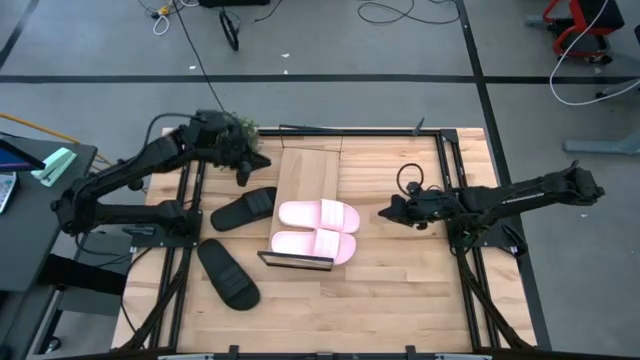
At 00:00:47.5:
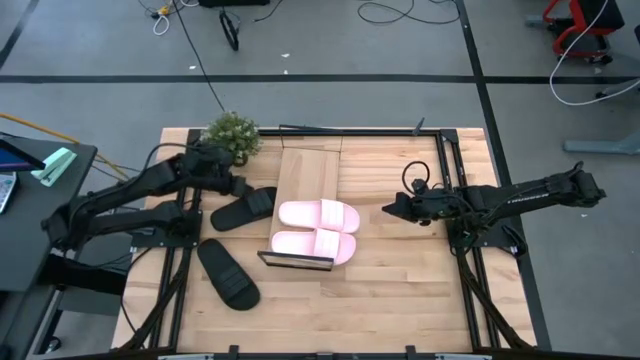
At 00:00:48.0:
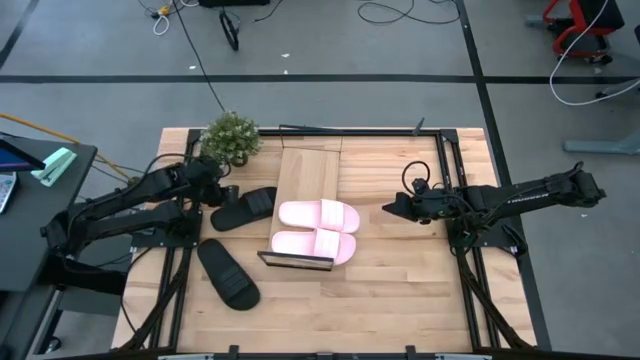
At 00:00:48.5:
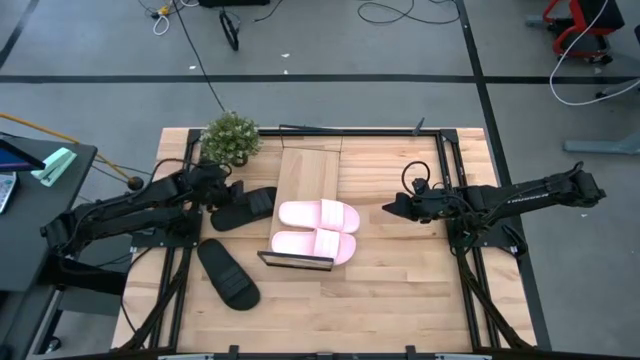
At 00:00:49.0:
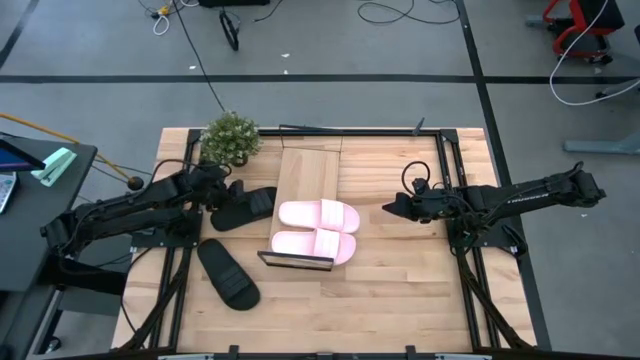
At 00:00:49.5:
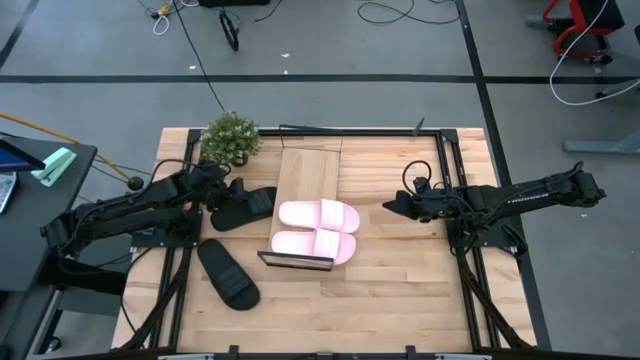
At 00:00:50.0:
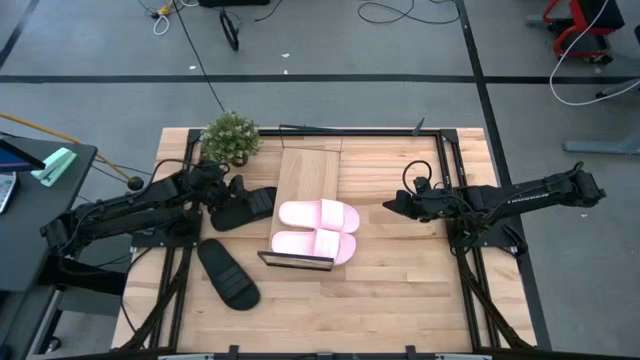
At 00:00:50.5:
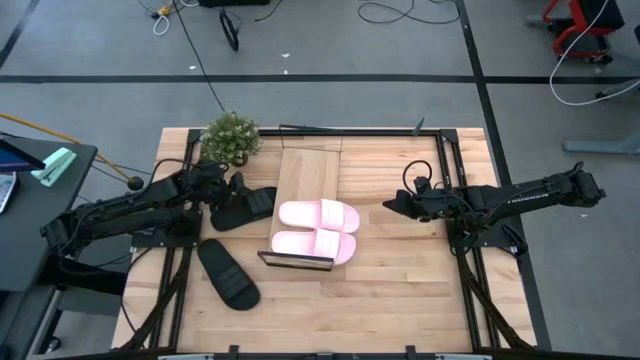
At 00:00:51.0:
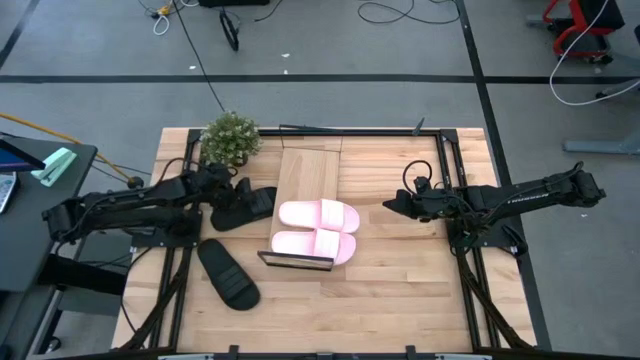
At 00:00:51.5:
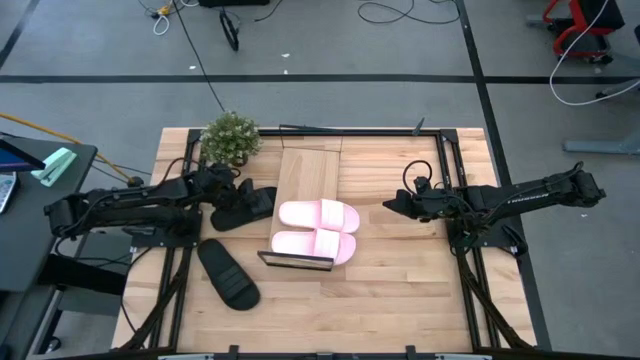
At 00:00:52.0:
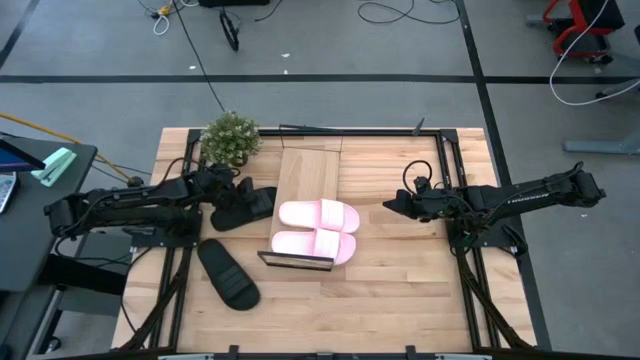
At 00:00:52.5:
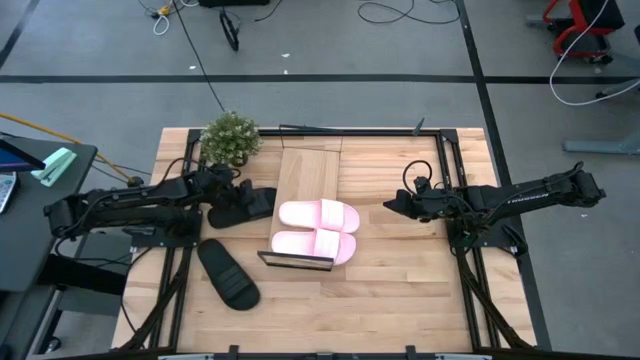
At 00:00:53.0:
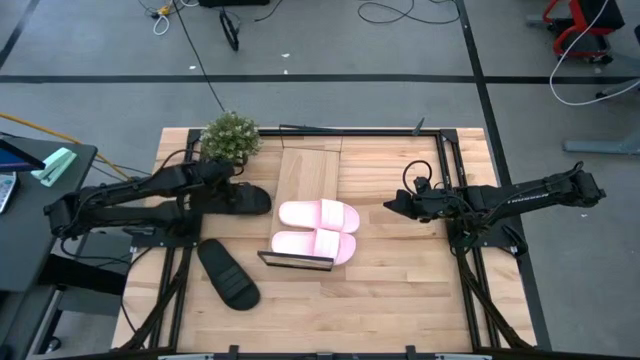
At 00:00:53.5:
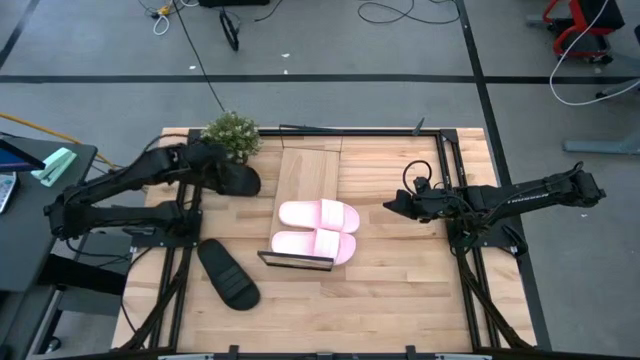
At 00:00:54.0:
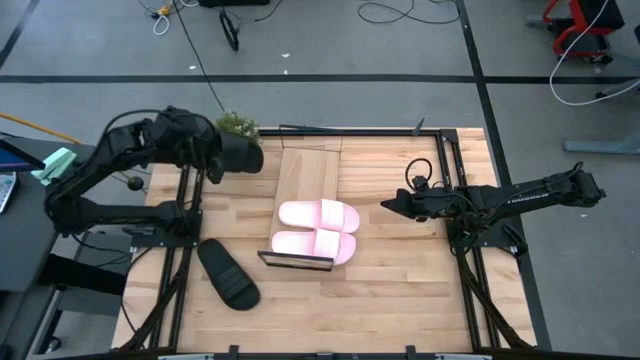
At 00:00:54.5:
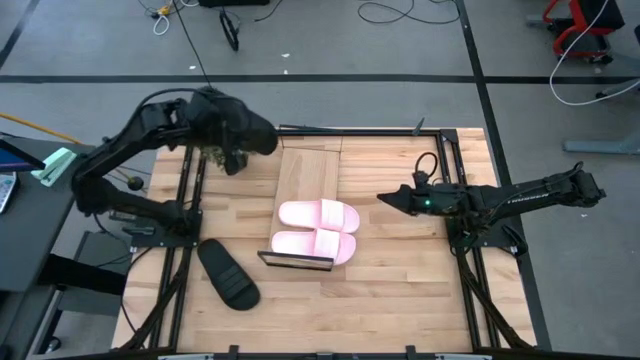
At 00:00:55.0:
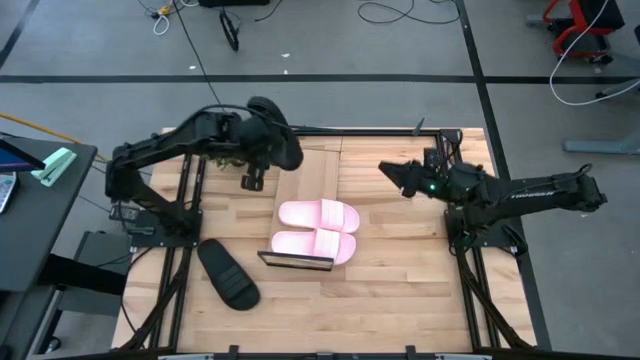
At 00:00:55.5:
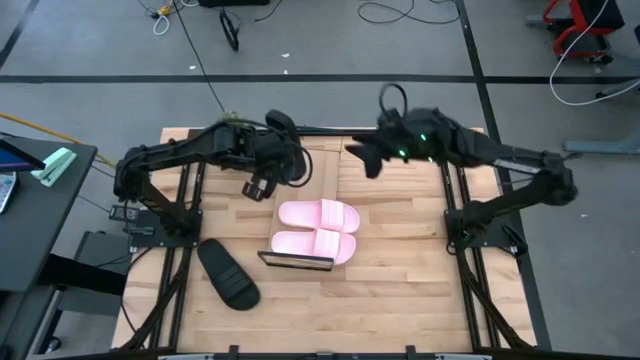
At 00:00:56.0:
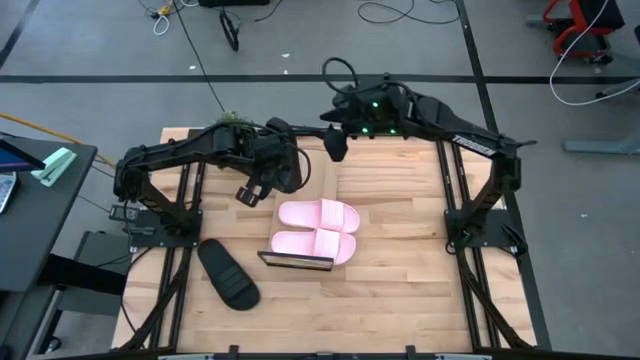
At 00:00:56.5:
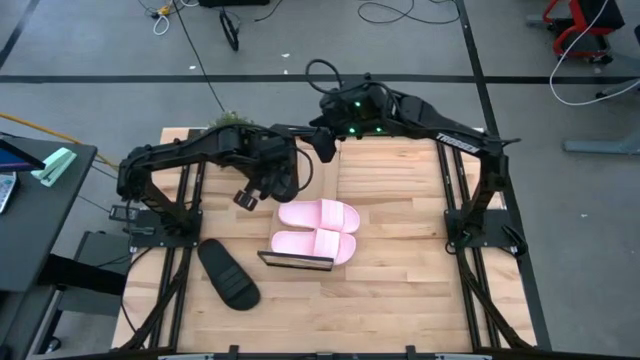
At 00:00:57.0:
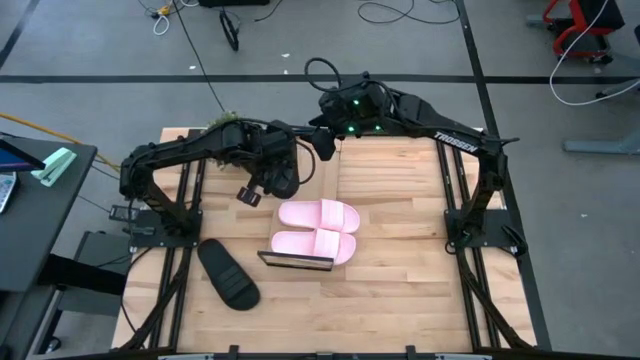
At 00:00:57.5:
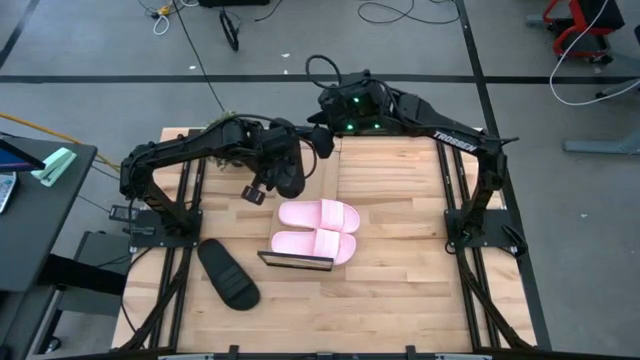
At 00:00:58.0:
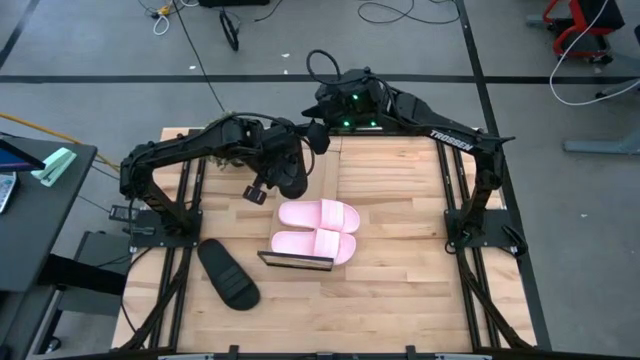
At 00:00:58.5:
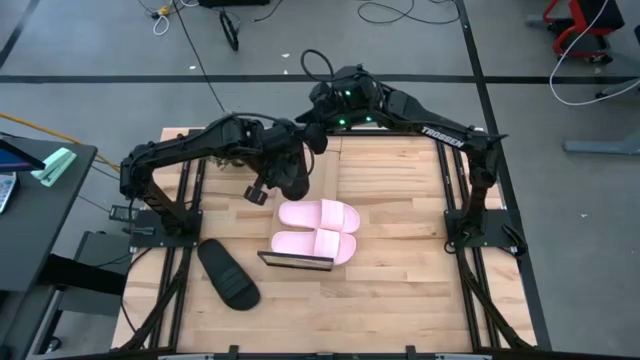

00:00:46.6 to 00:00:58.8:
Task: Pick and place slides into the shelf
Put the top black slide on the shelf

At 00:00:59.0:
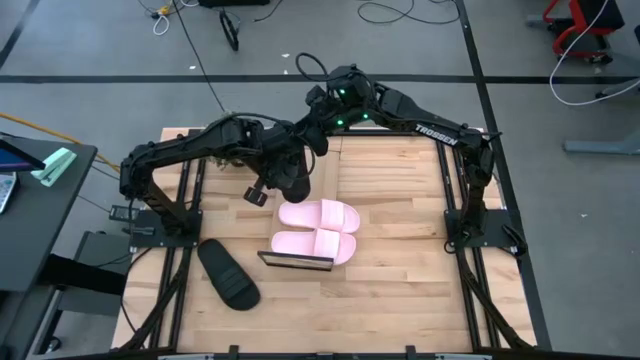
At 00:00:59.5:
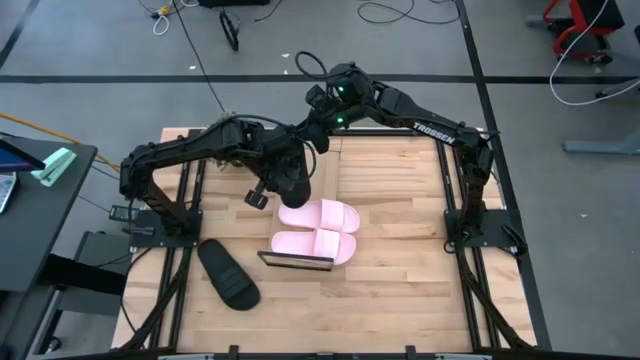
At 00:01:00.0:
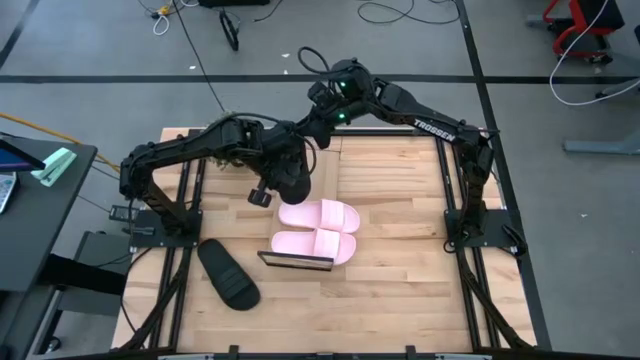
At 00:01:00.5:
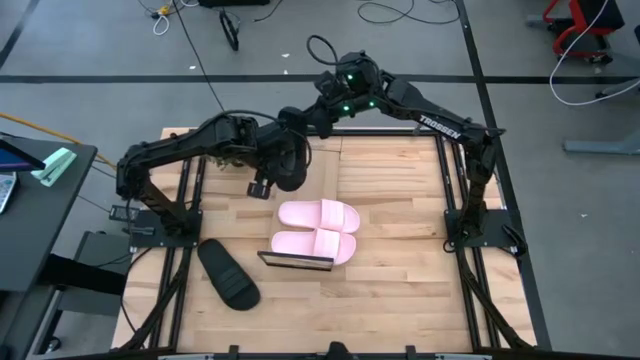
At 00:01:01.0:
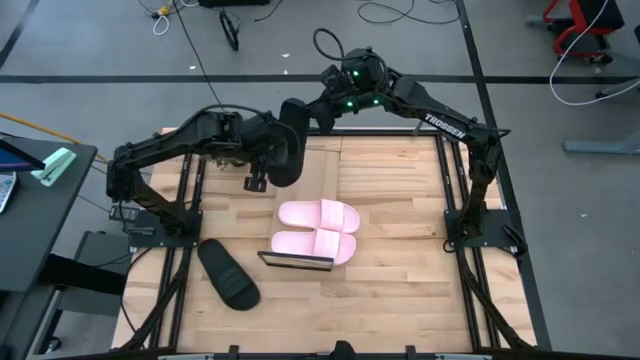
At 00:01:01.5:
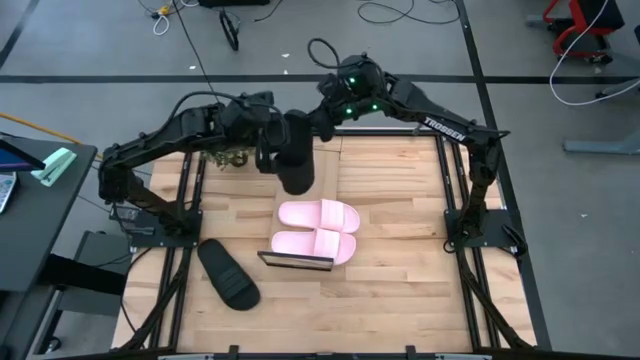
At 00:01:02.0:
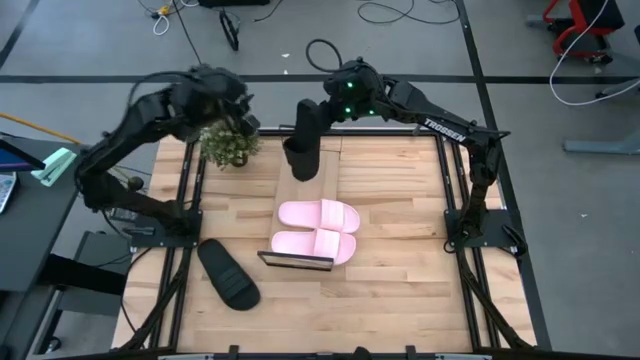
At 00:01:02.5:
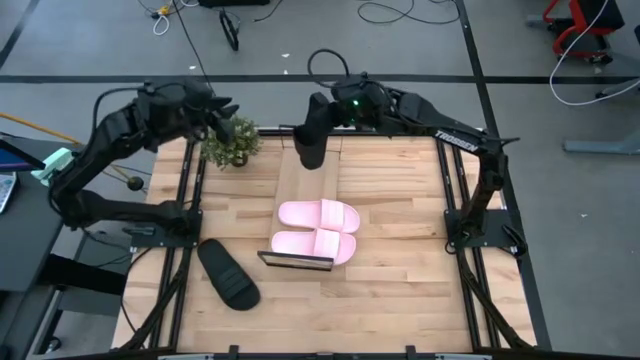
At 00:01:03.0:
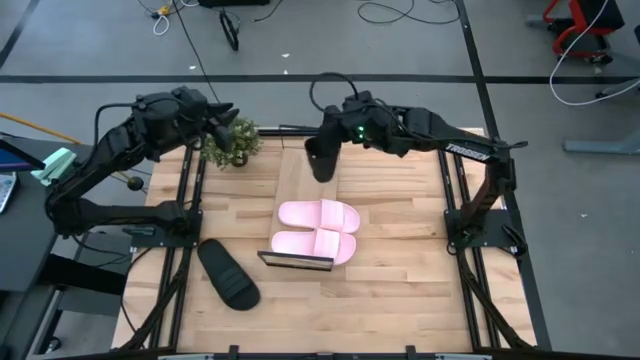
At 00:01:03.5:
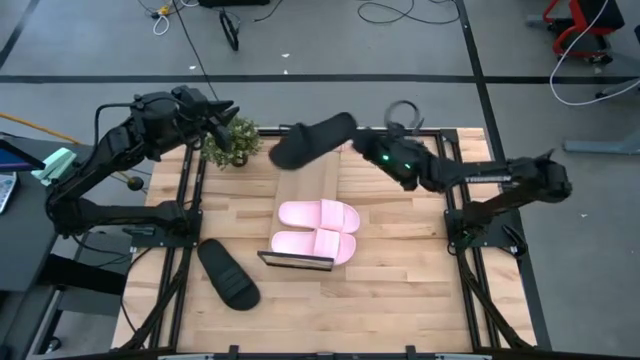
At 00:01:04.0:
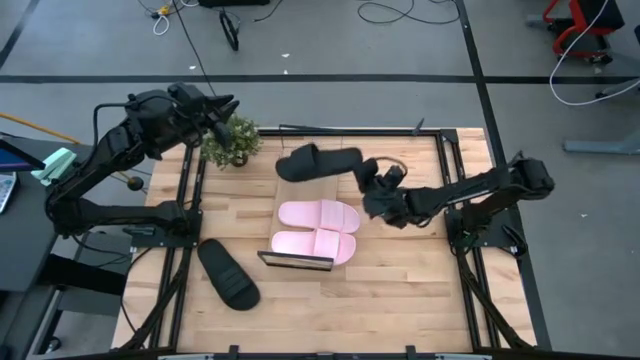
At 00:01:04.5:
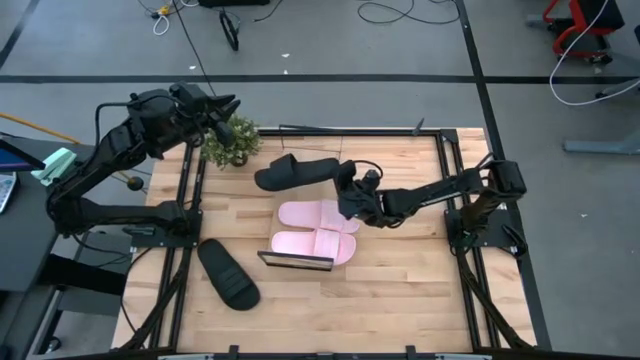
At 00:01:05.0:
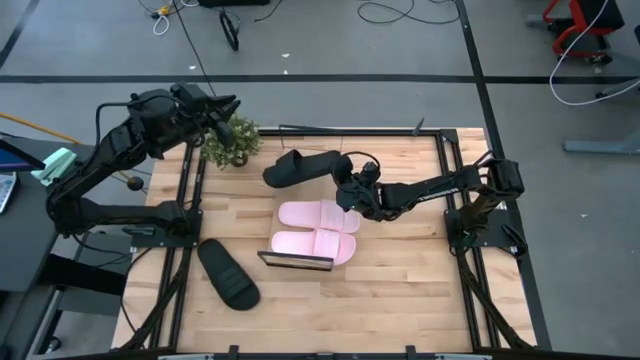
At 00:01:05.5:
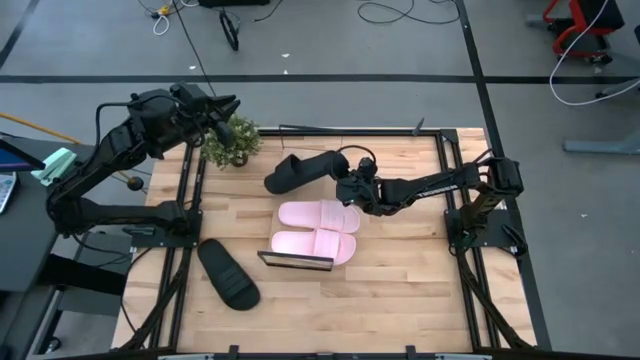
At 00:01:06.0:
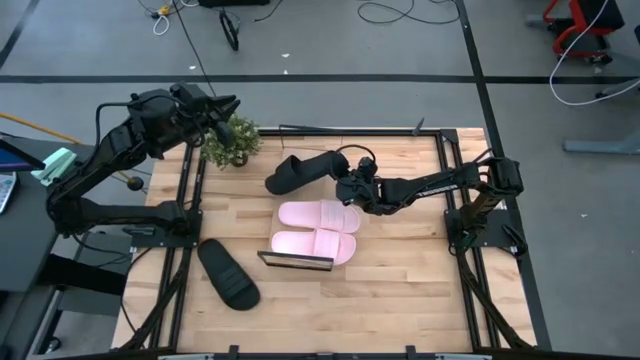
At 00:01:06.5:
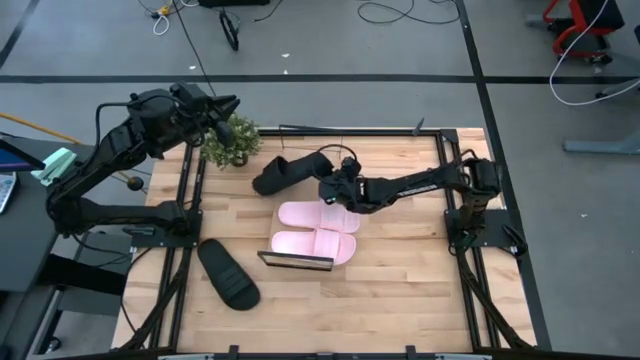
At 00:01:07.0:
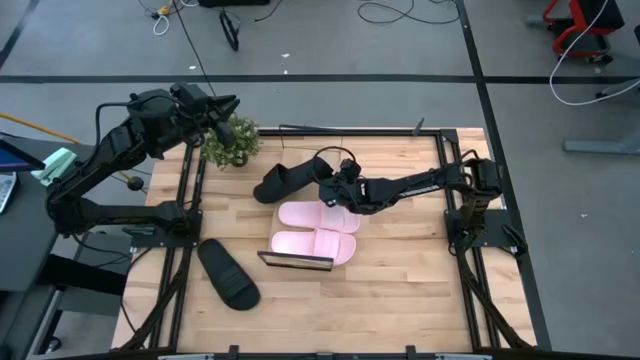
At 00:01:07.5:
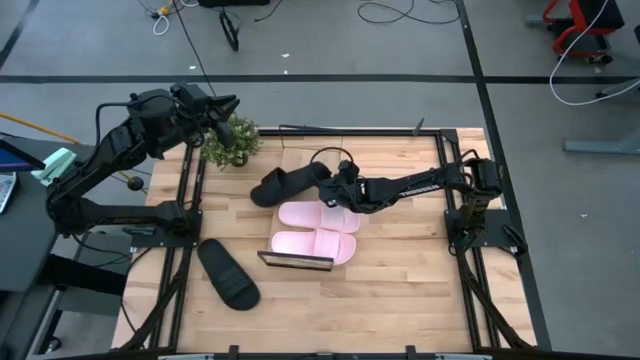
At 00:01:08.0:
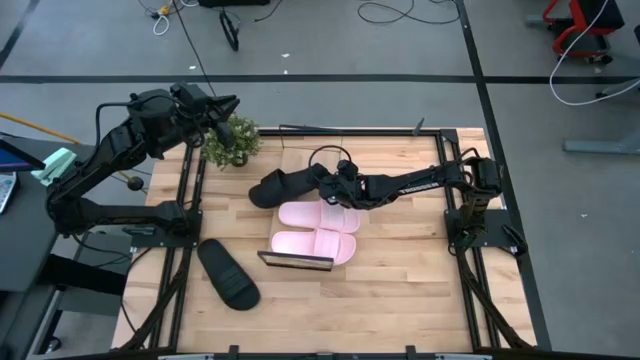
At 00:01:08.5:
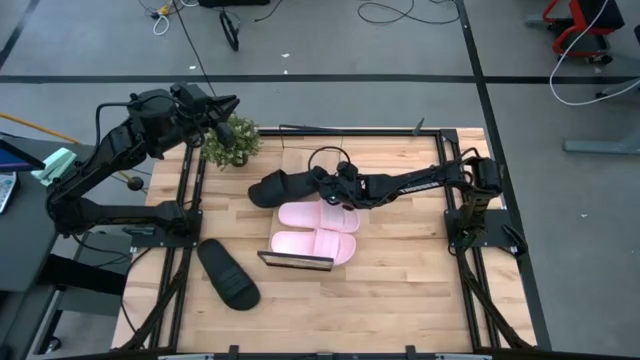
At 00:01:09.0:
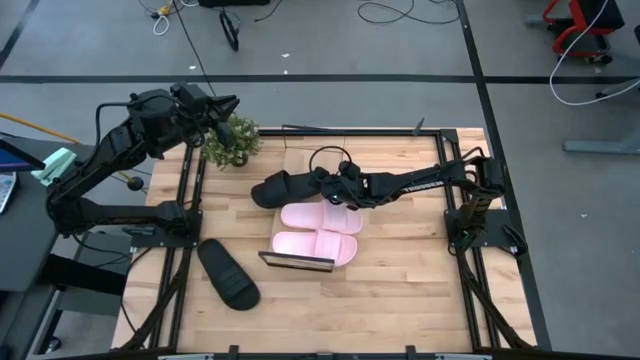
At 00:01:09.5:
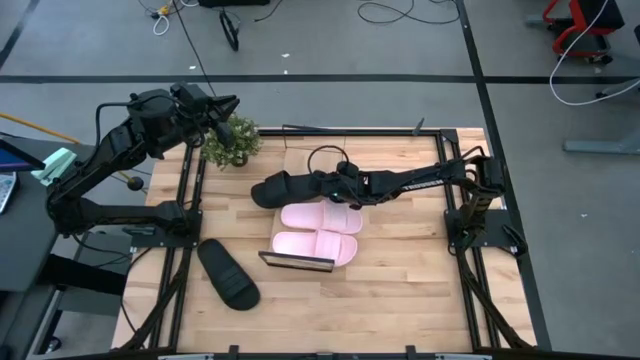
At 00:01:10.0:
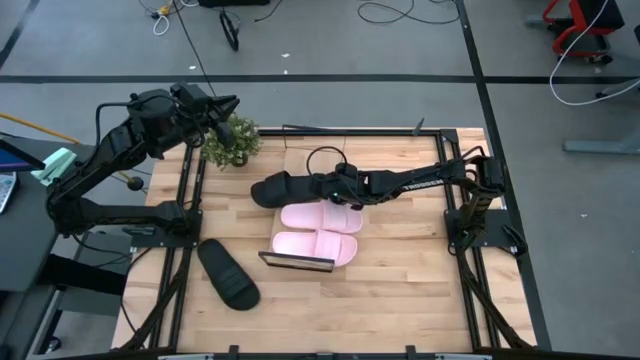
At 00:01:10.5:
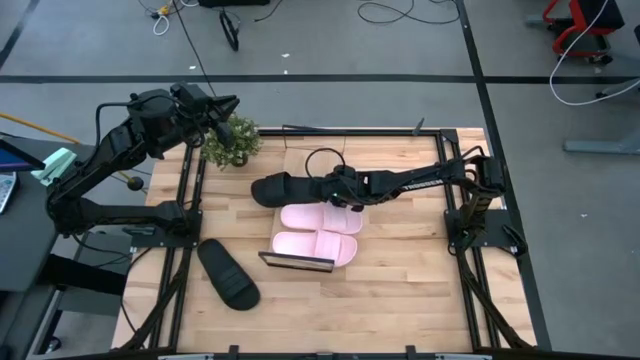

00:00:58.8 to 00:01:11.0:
Put the top black slide on the shelf
